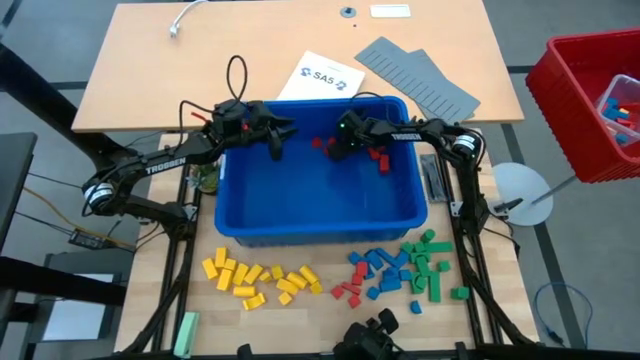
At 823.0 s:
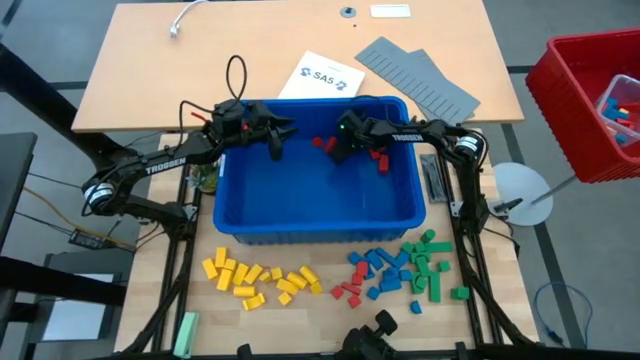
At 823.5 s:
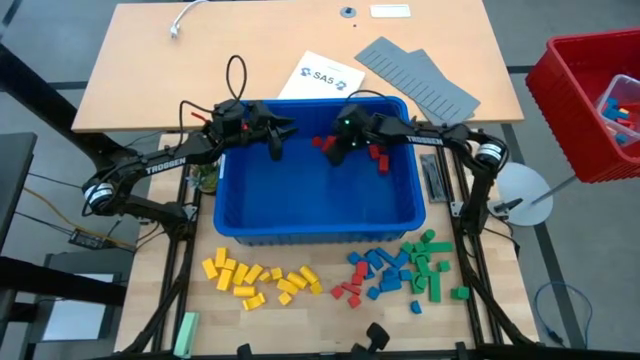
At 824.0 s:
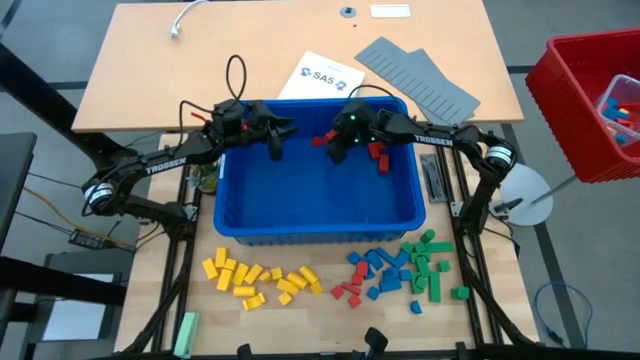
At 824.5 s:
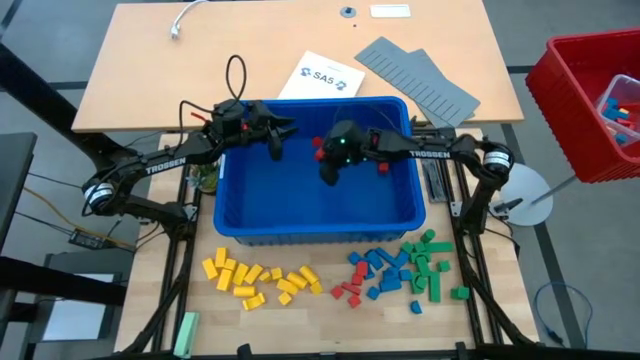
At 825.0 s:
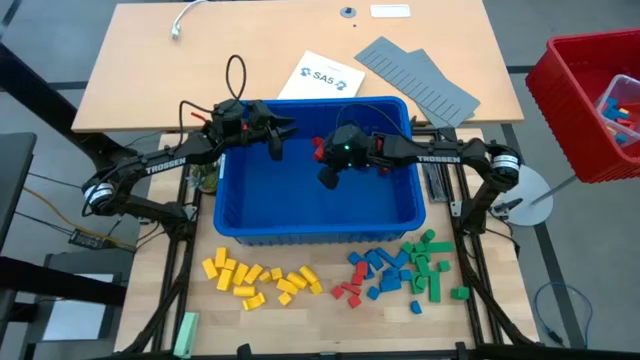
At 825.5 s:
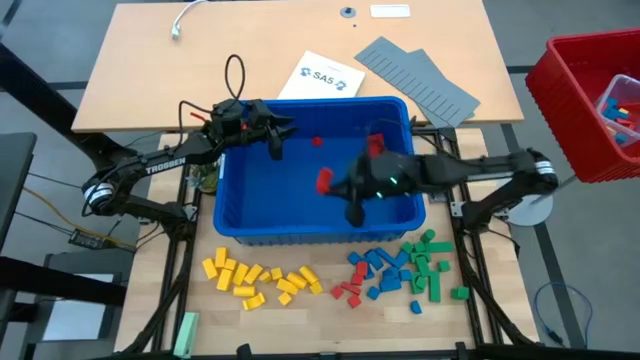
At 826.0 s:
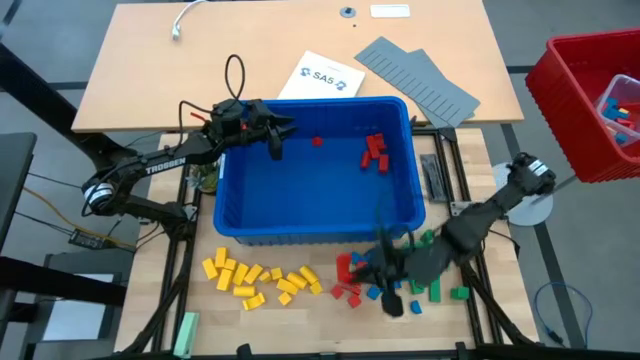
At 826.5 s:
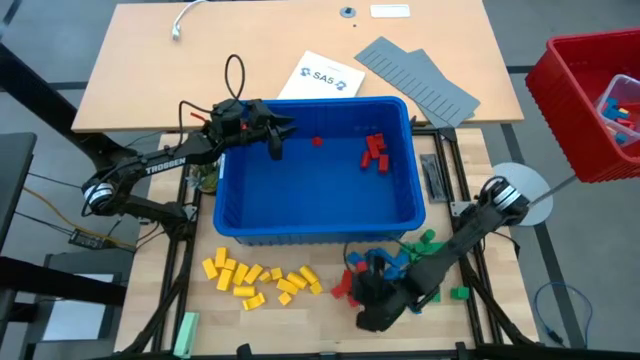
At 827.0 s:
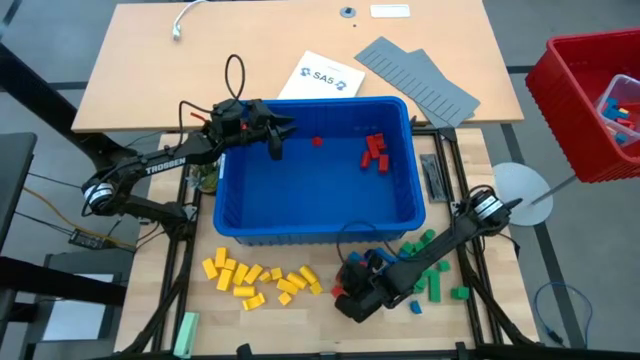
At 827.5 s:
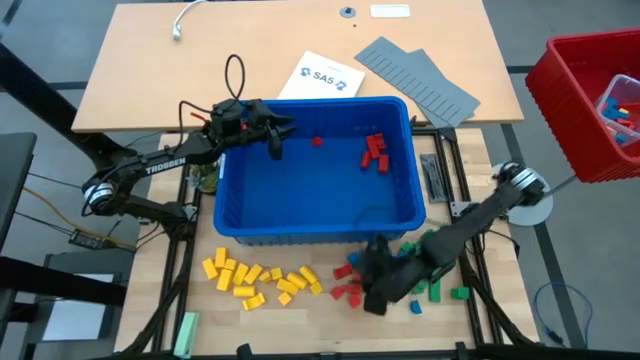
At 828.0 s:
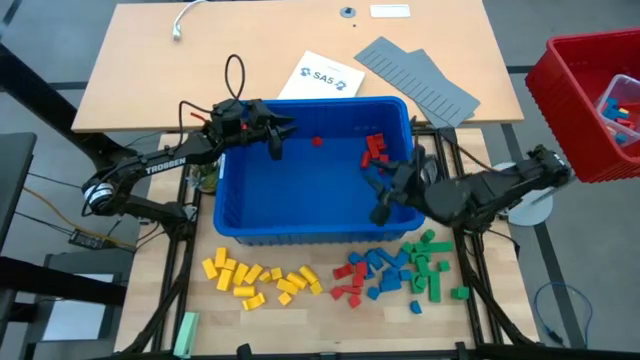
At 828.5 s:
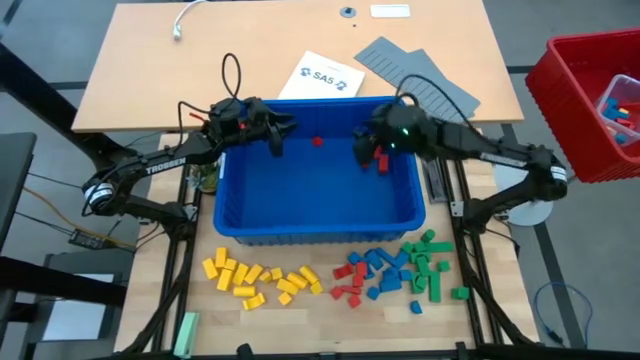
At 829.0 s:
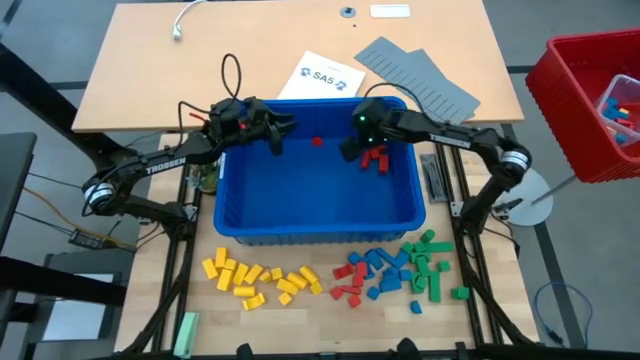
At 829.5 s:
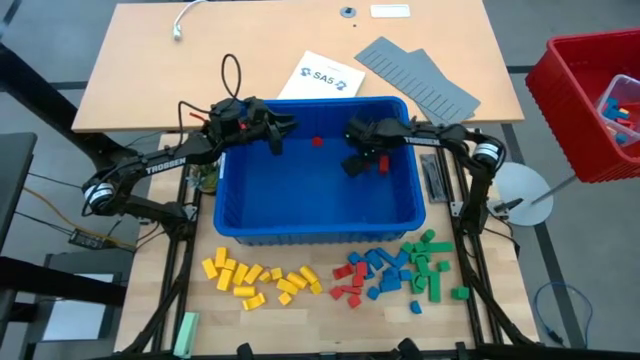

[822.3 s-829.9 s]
Task: Sort blocks
Remove the red block from the blue bin

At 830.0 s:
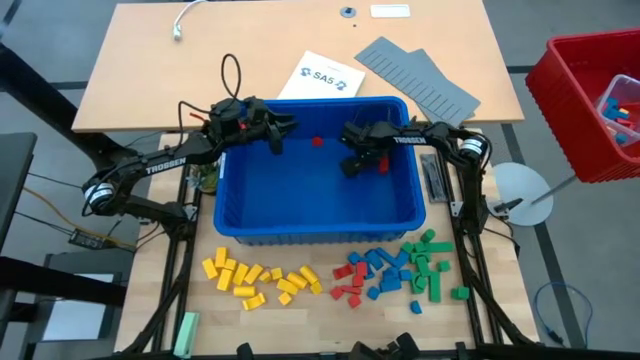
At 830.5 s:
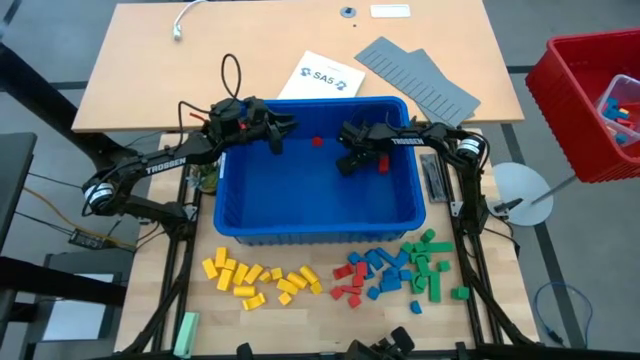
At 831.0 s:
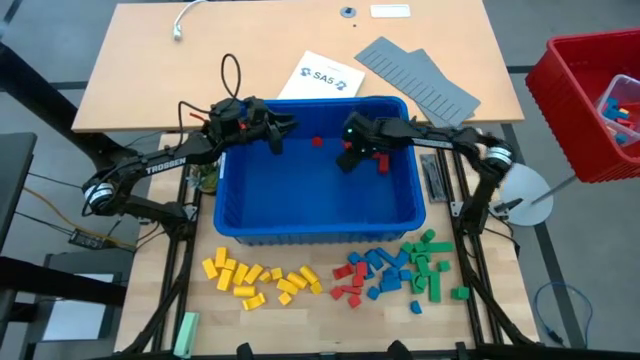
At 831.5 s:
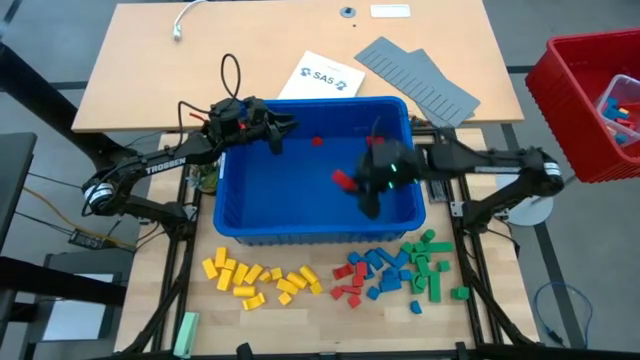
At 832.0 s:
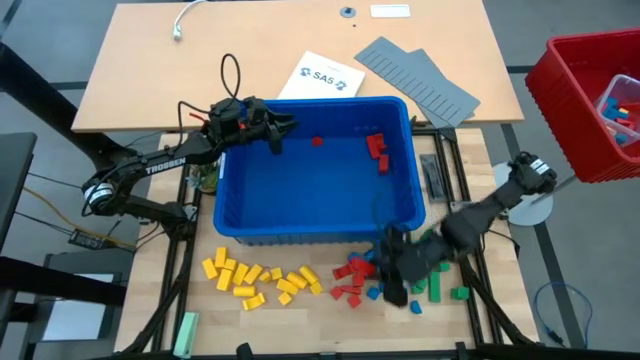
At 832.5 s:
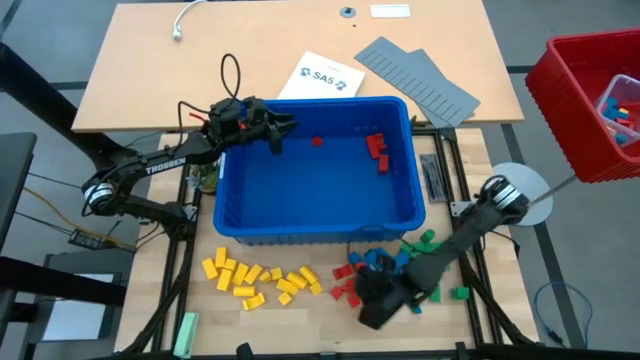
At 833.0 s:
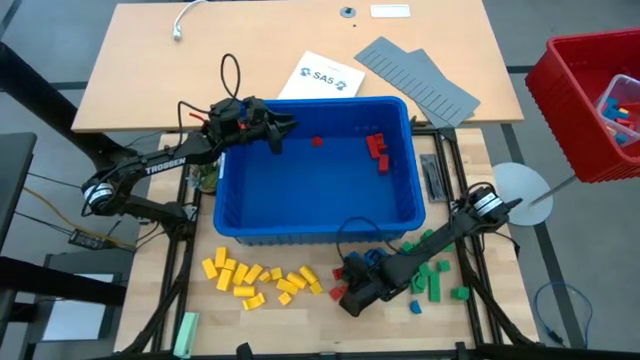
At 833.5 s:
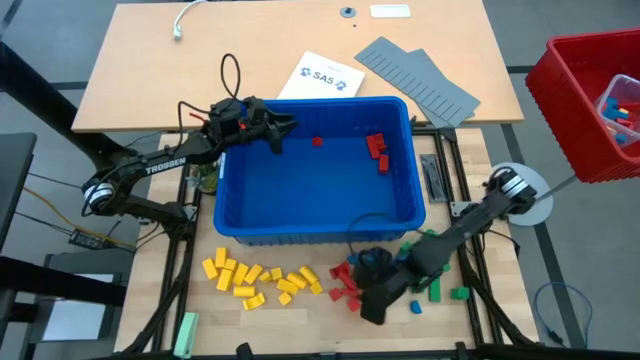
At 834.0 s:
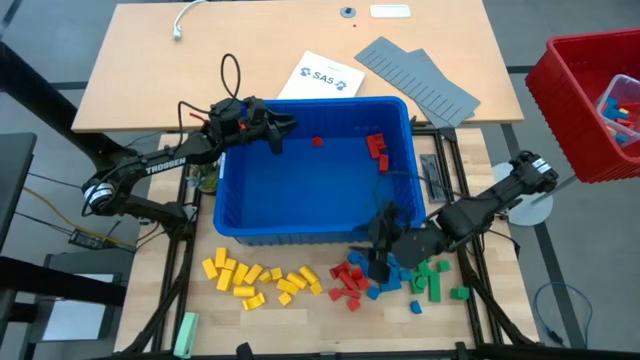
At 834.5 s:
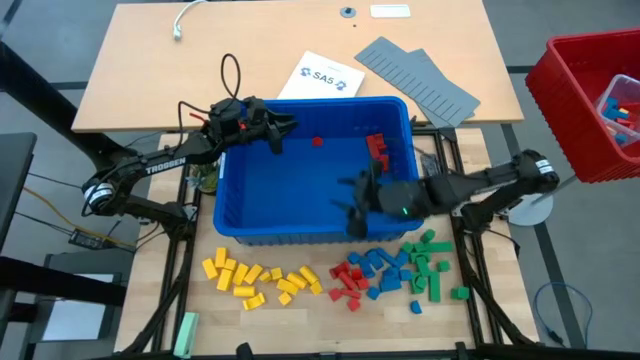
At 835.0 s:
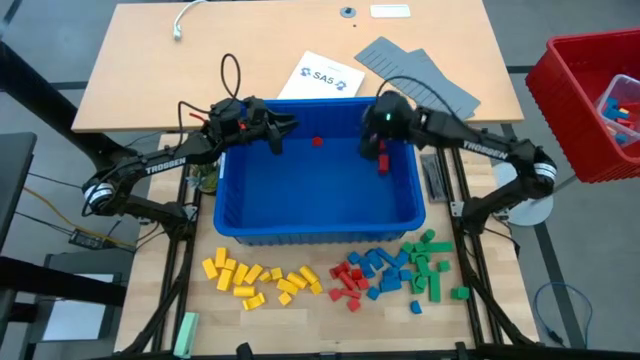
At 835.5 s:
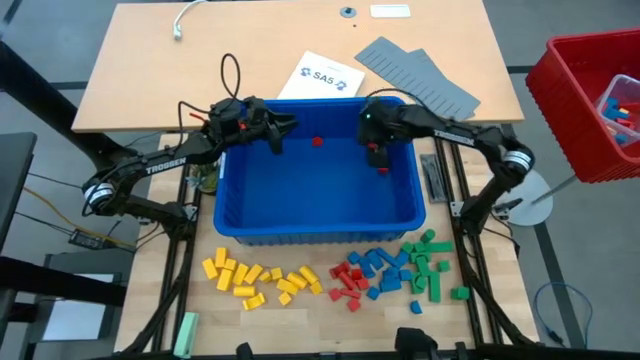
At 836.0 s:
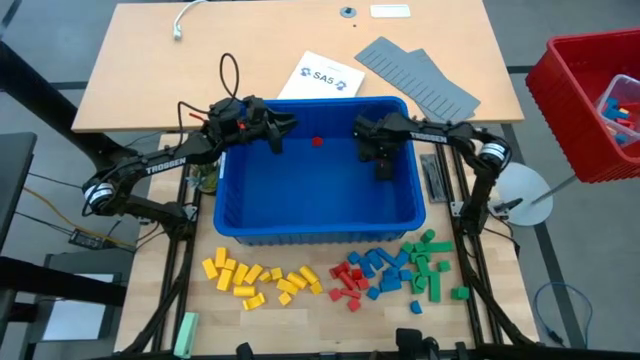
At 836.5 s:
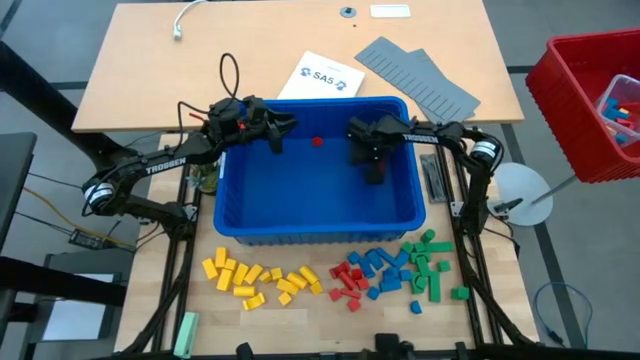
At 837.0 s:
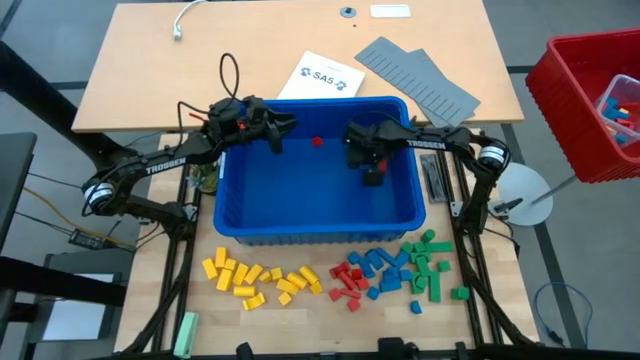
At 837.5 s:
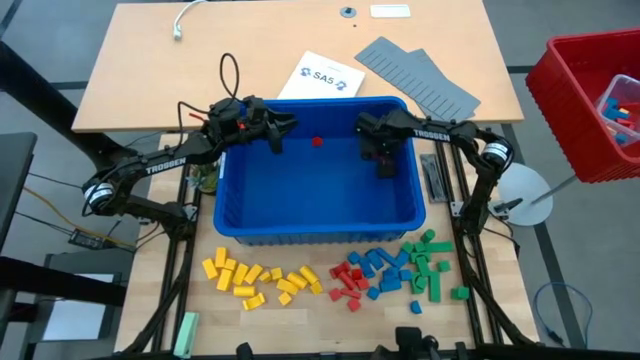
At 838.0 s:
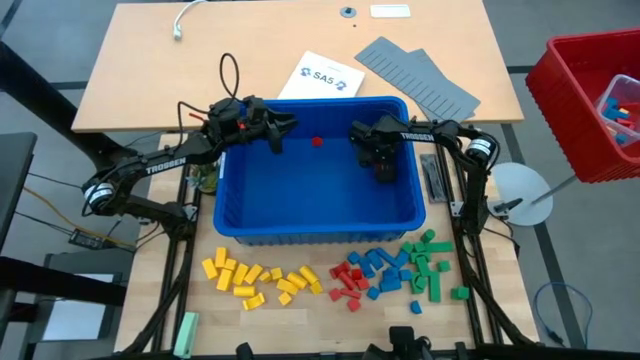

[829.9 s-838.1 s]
Remove the red block from the blue bin

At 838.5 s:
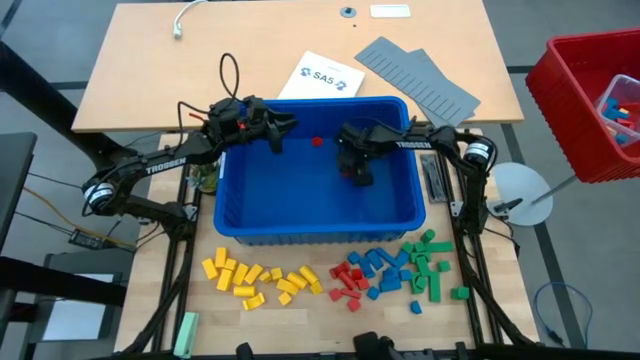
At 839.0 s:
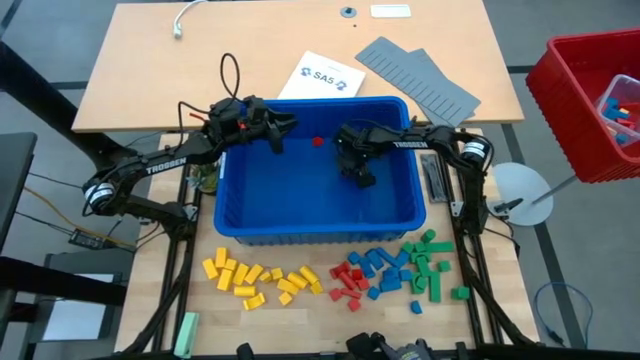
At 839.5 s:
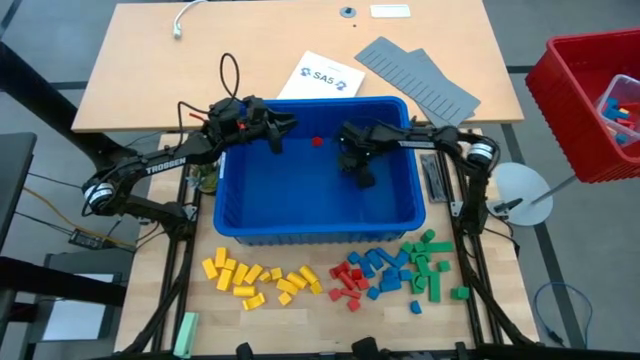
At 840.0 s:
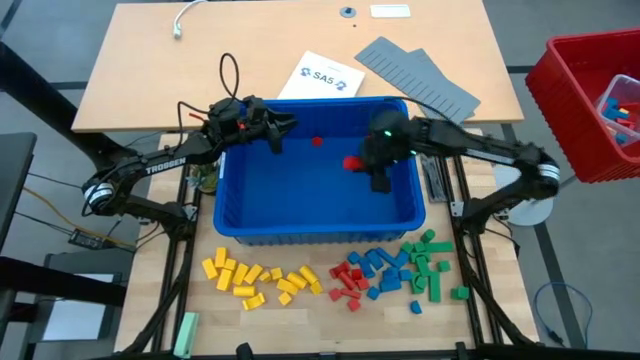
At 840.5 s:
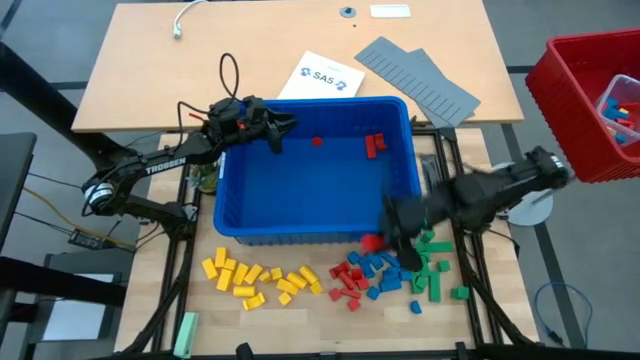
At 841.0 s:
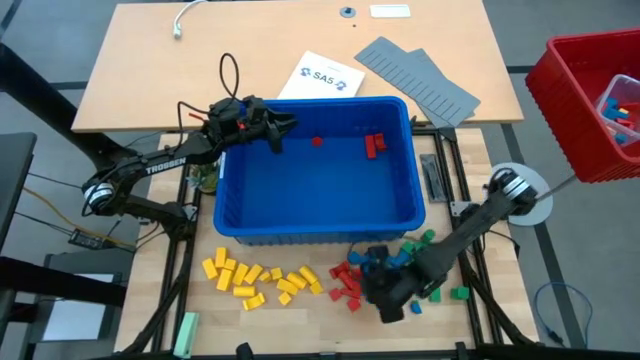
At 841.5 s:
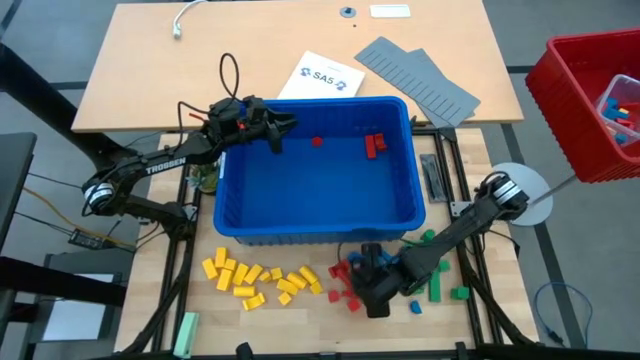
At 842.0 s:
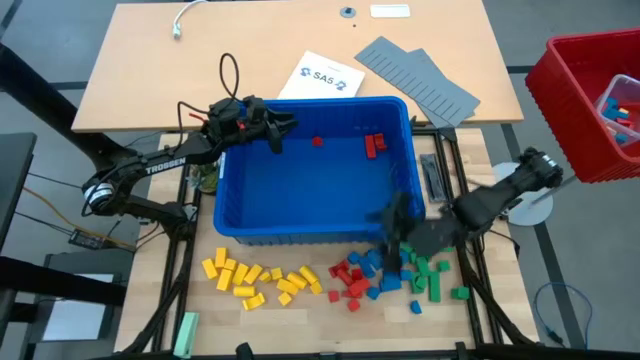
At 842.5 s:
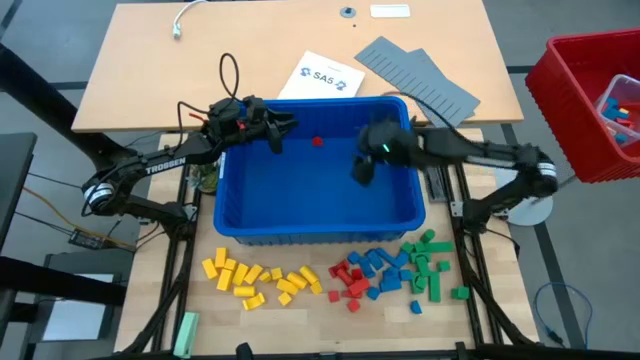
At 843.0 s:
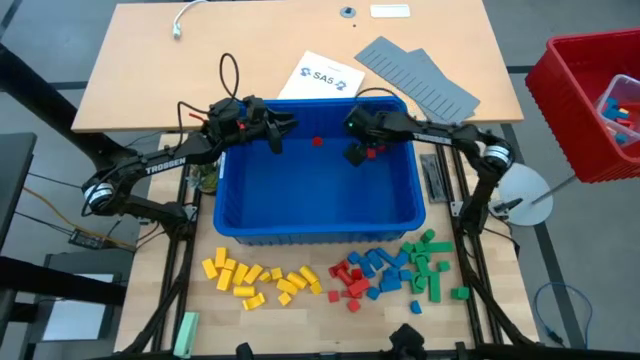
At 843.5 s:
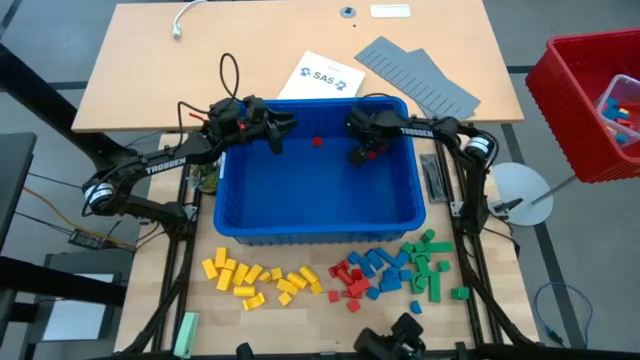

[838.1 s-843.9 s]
Remove the red block from the blue bin
